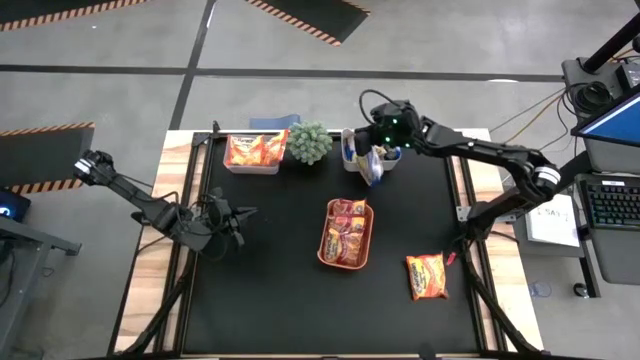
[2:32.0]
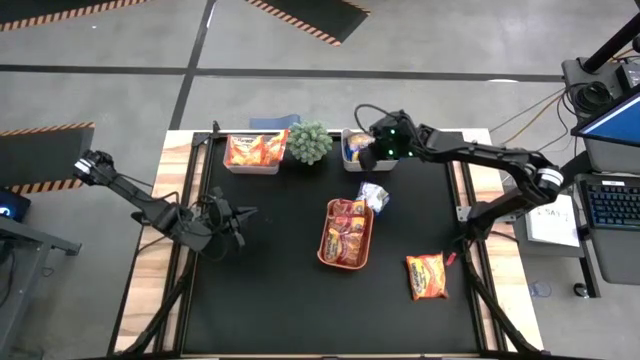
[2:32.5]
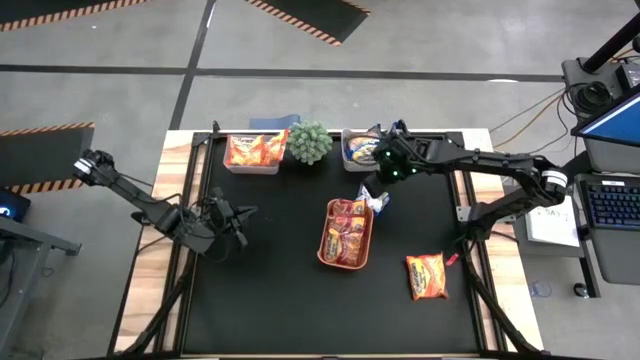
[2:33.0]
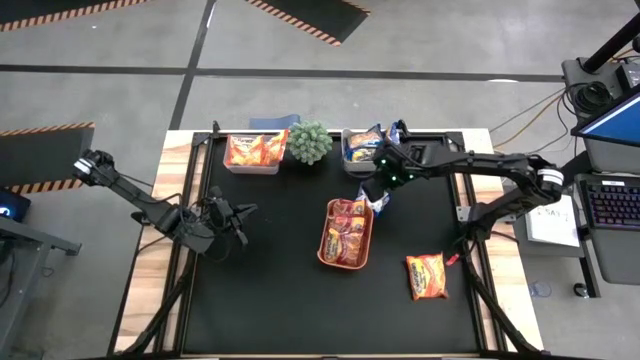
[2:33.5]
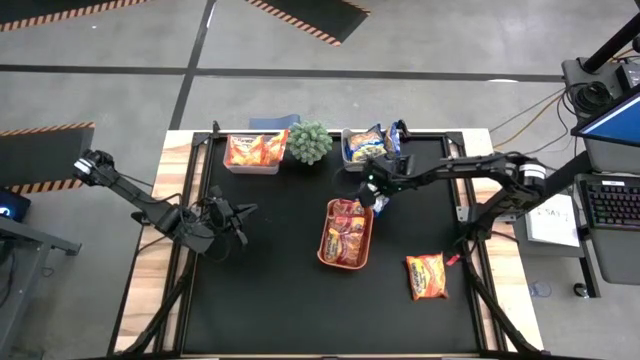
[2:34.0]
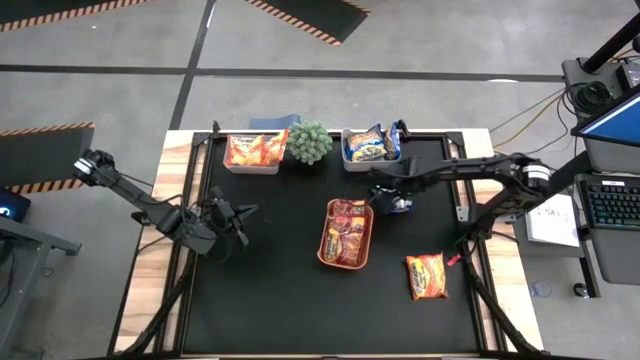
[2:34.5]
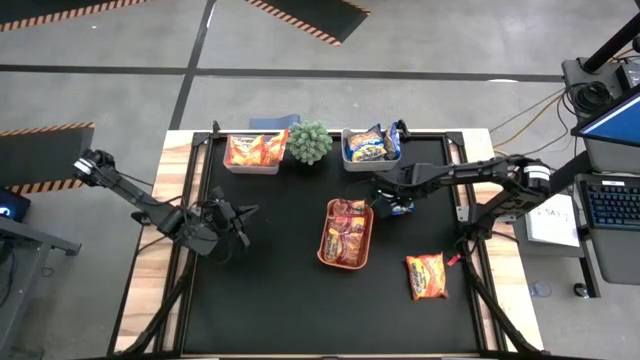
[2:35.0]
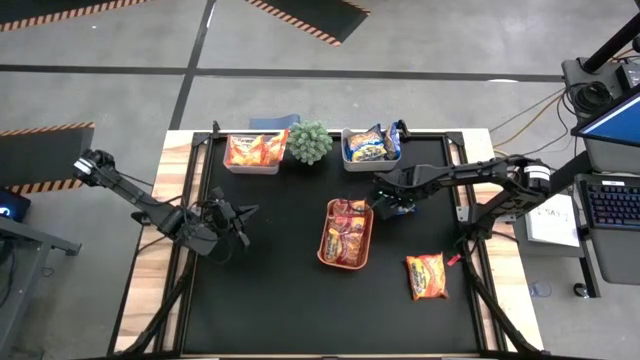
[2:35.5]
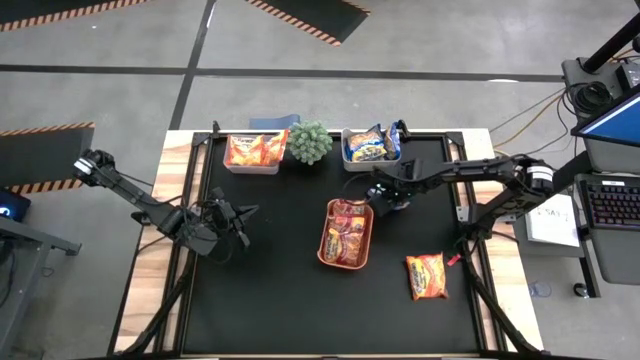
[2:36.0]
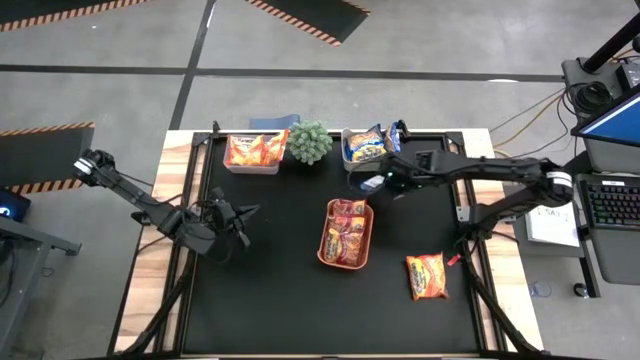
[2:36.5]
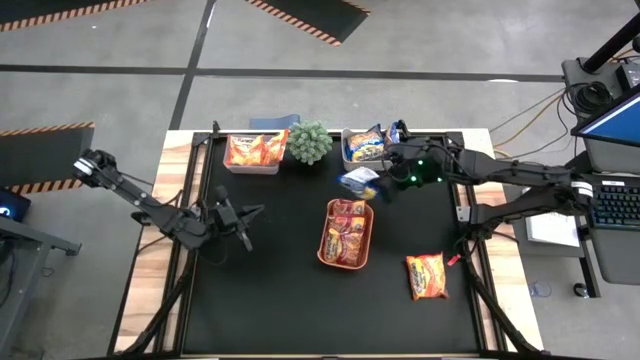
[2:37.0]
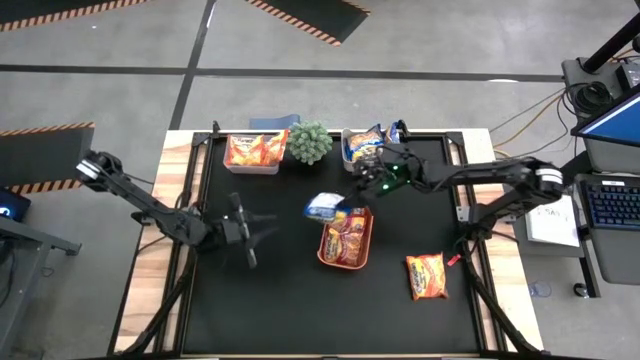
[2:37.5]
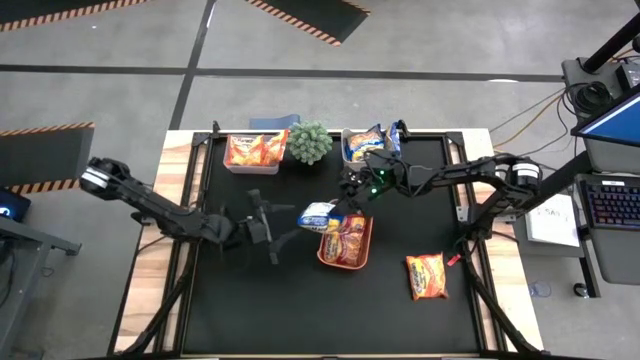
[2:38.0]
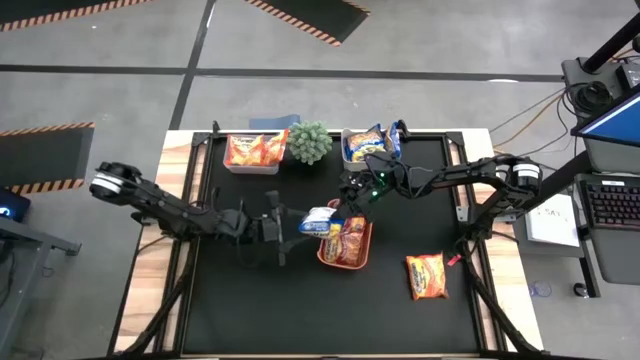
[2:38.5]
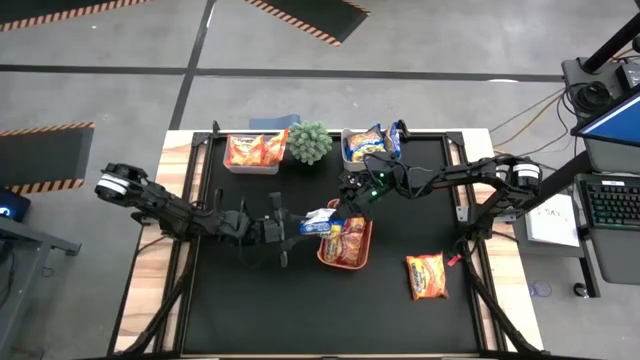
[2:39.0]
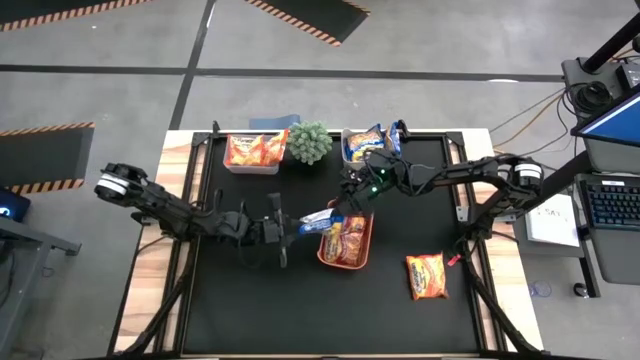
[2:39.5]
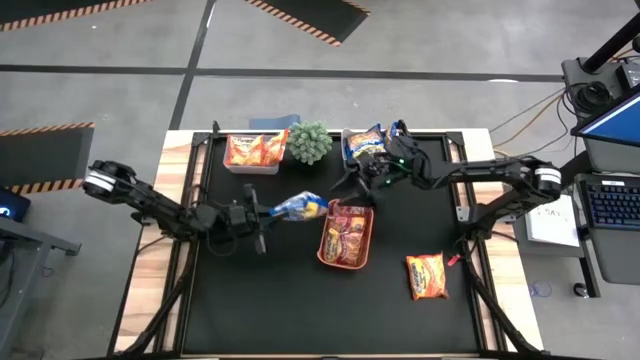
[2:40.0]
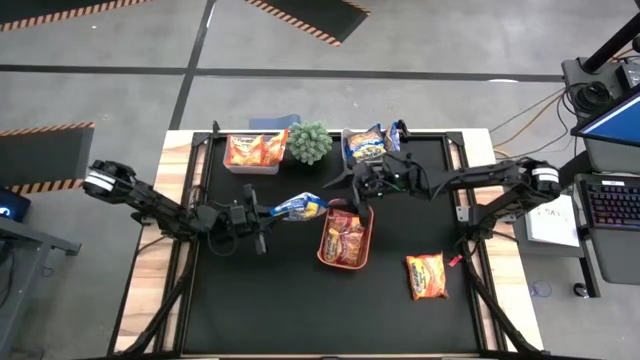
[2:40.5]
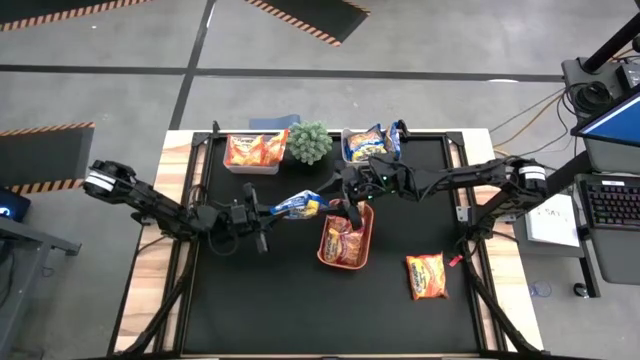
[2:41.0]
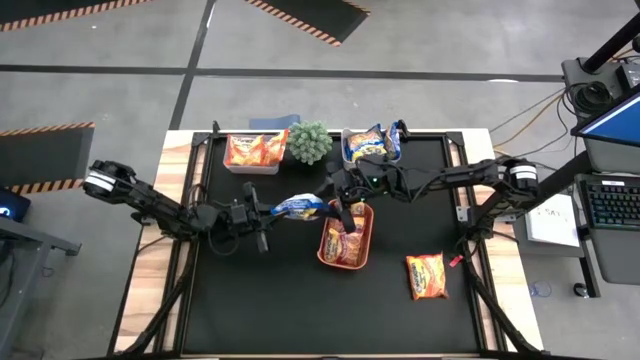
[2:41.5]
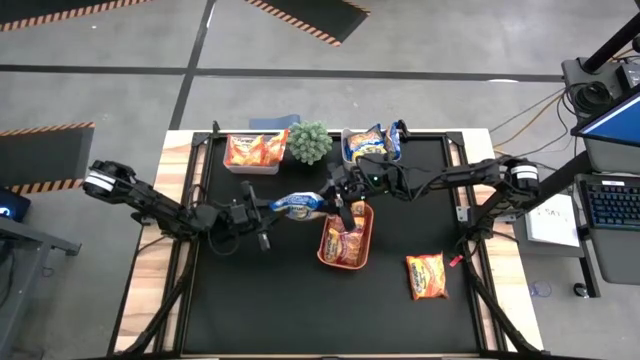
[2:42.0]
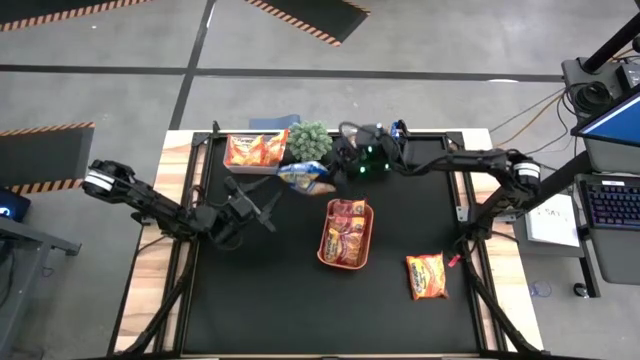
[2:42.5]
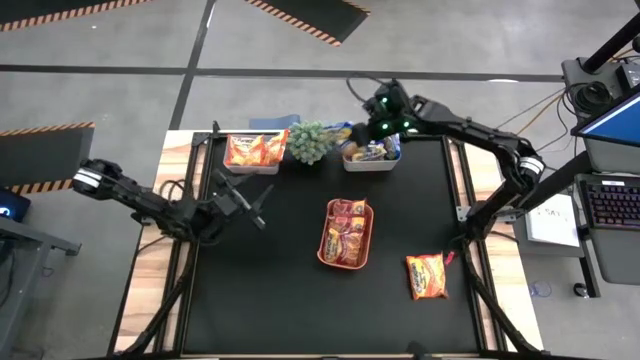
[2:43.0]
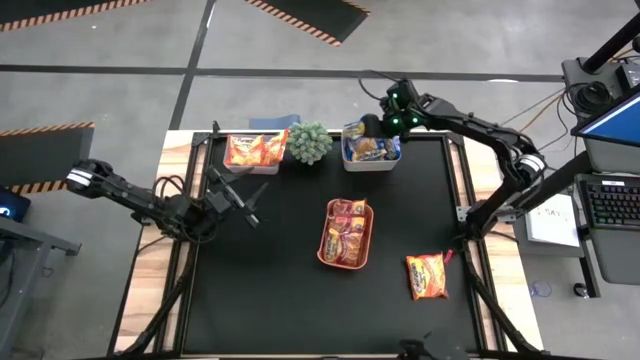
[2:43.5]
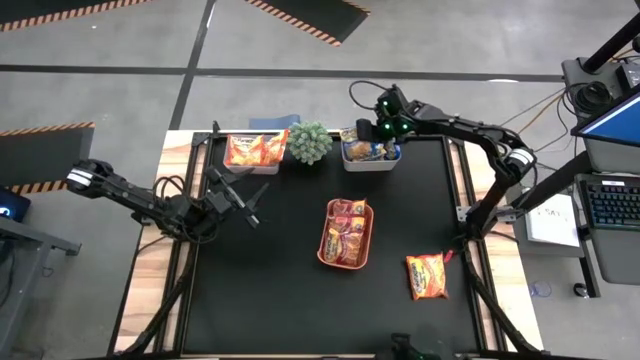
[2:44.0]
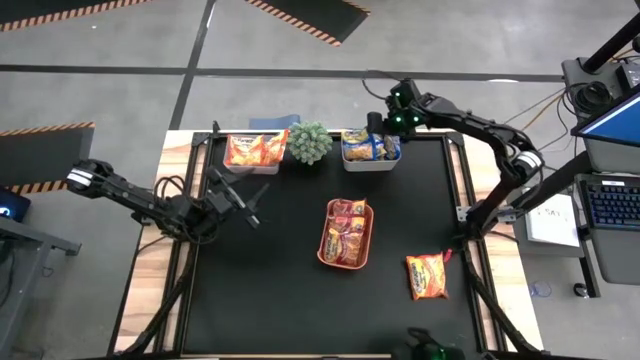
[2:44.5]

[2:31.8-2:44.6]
Task: Sort Maruchan noodles
Put the blue noodle pack into the gray bin

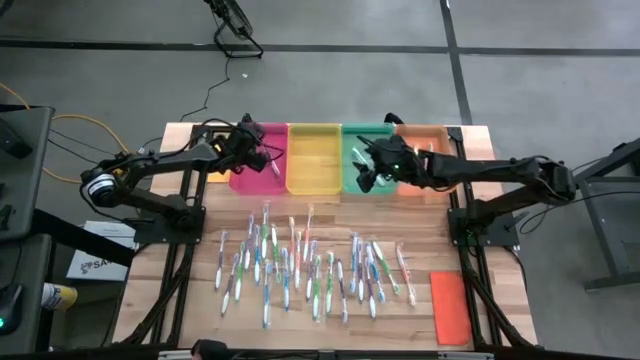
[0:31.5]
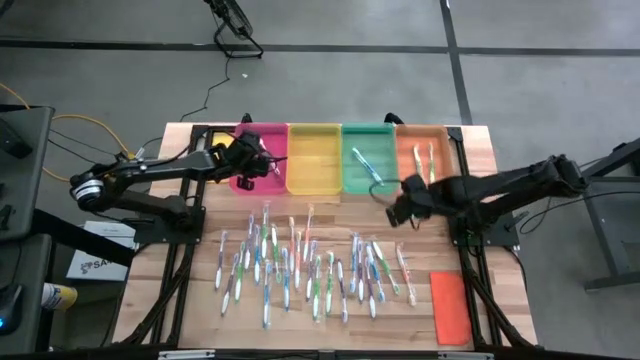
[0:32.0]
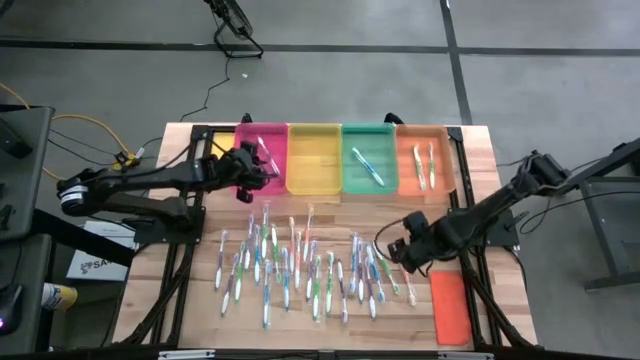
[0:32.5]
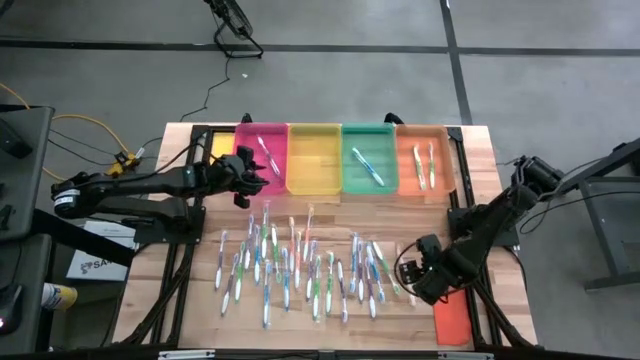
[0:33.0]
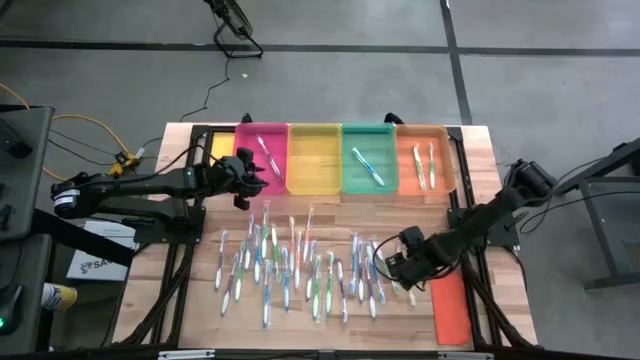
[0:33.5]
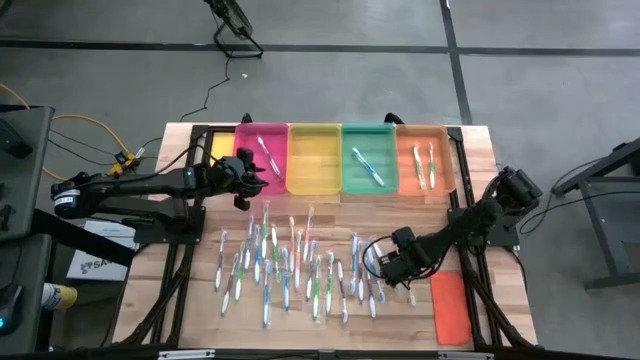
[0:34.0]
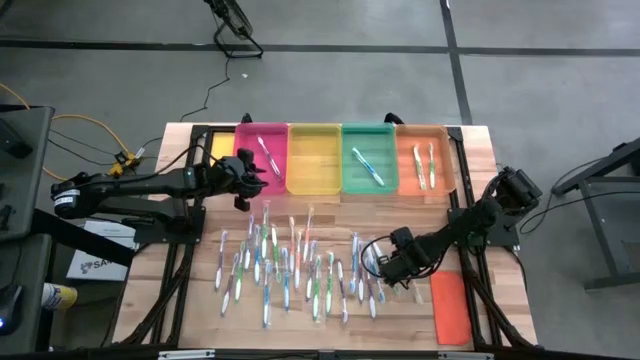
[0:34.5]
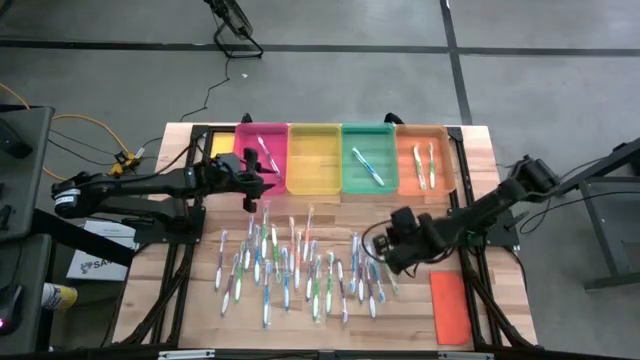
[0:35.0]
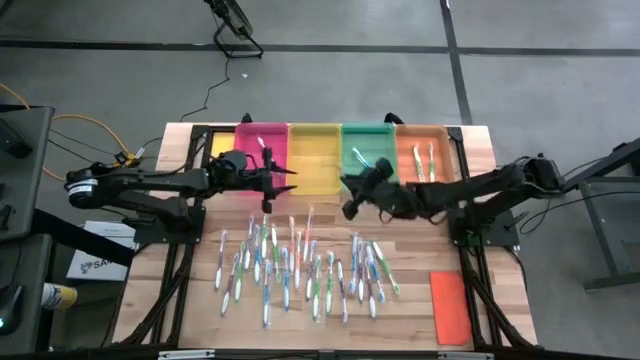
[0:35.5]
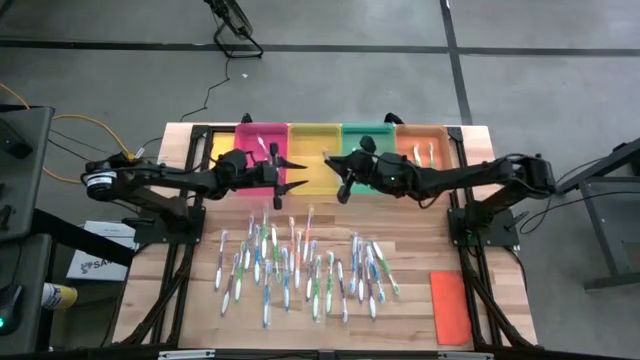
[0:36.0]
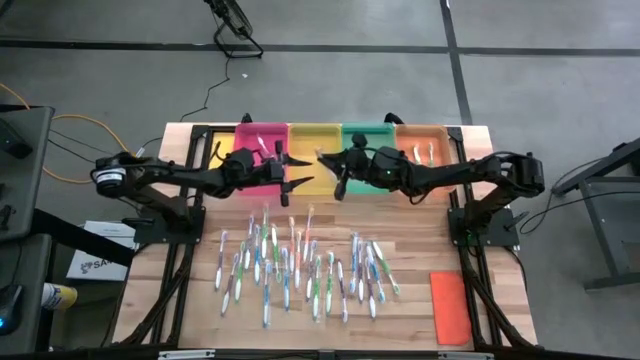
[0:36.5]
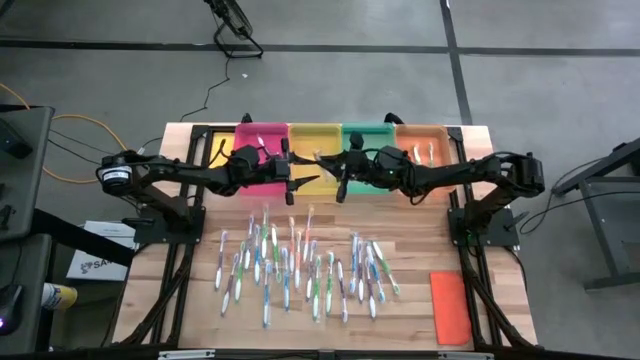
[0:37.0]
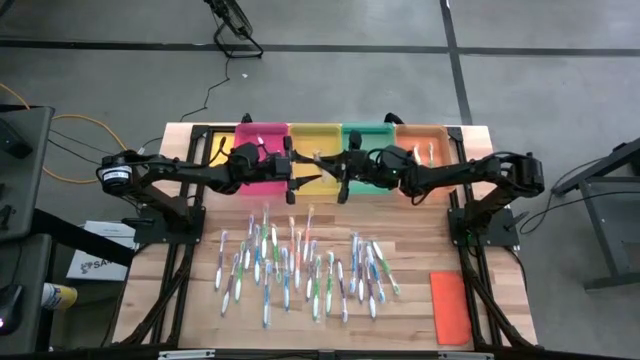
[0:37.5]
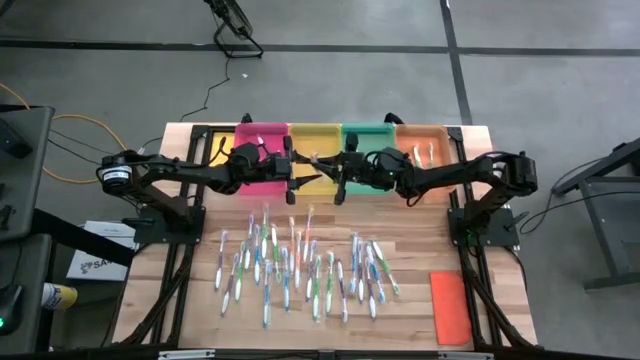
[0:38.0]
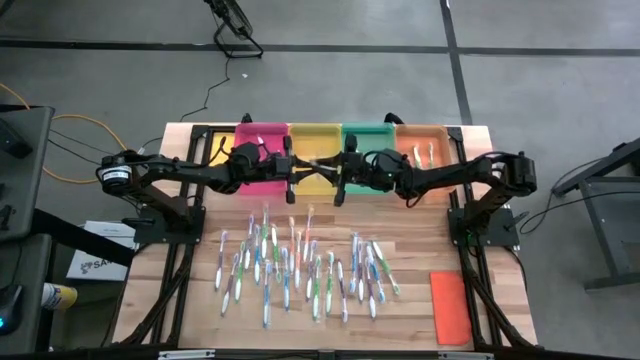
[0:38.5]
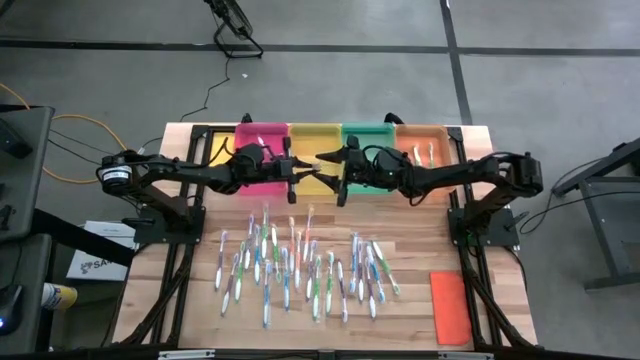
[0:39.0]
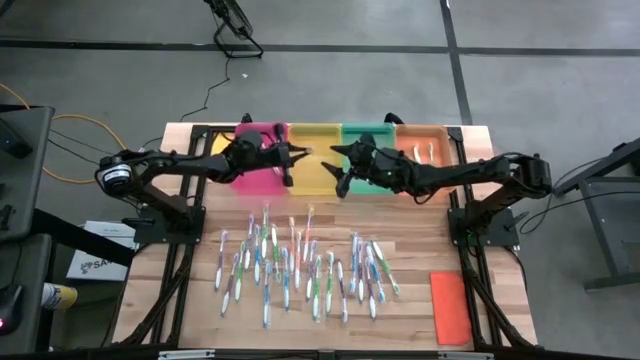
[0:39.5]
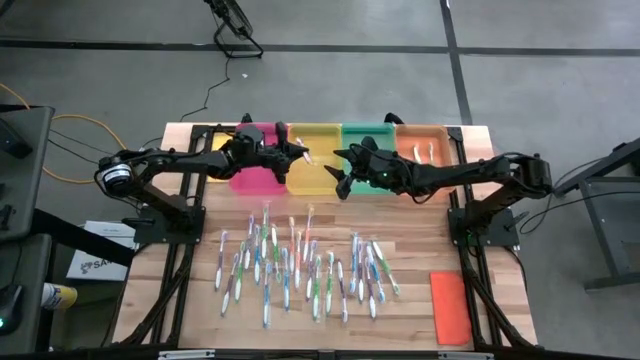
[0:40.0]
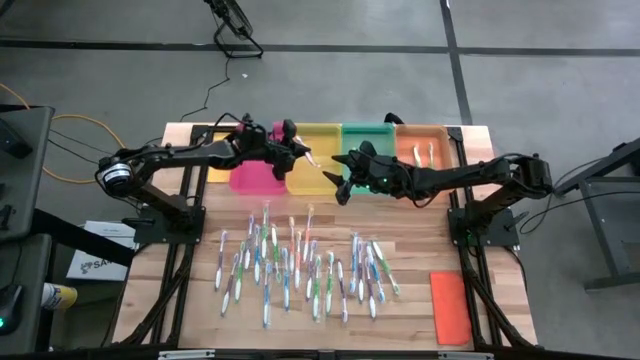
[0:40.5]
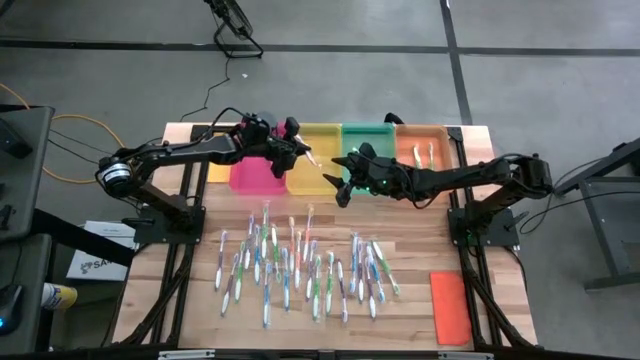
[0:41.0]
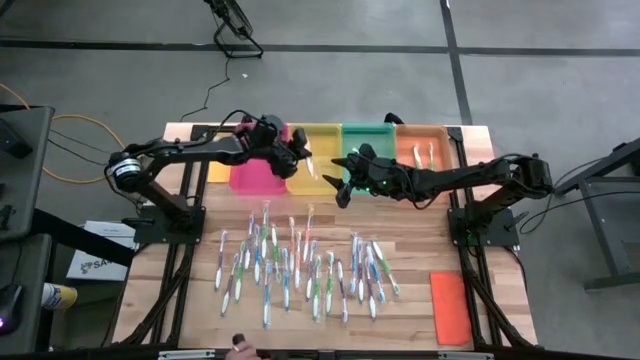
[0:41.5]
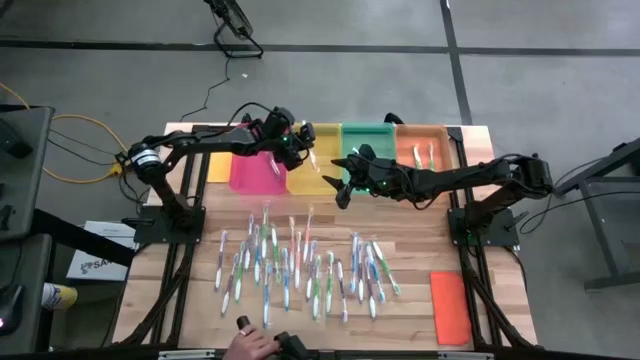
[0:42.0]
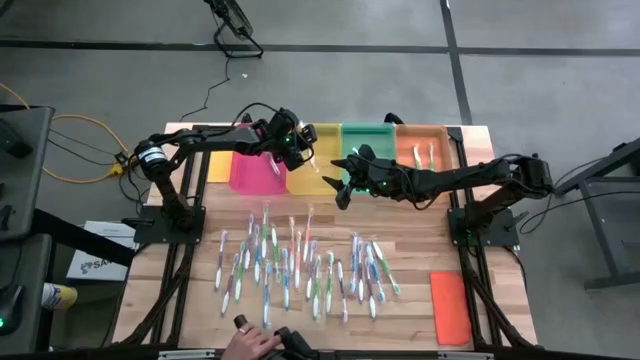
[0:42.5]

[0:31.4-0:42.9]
Task: Pick & Place Toothbrushes
Put the orange toothbrush into the yellow bin
